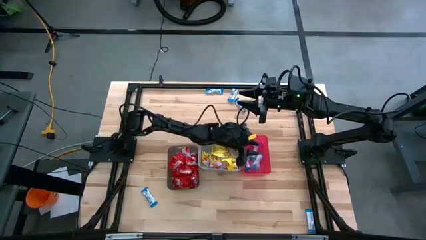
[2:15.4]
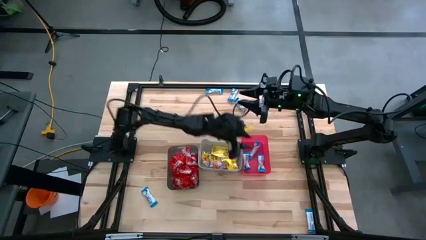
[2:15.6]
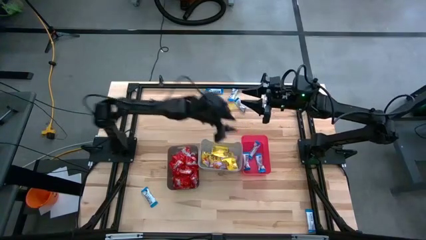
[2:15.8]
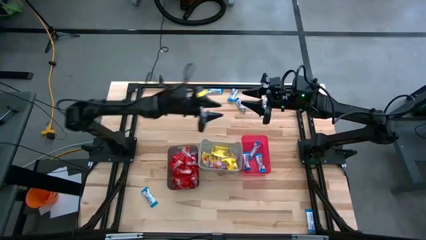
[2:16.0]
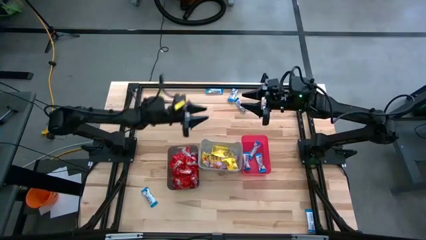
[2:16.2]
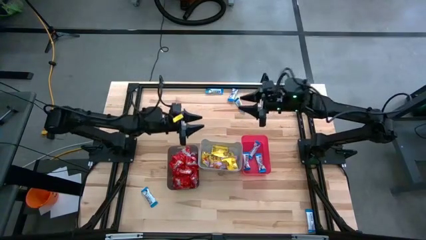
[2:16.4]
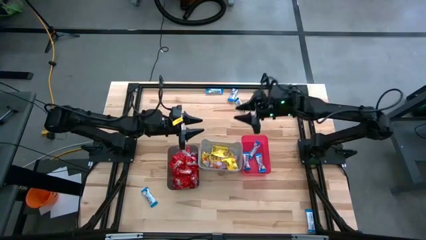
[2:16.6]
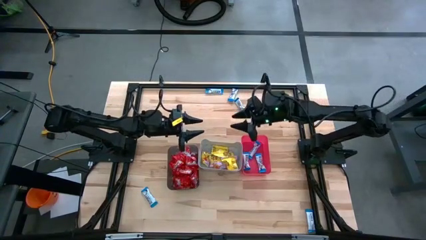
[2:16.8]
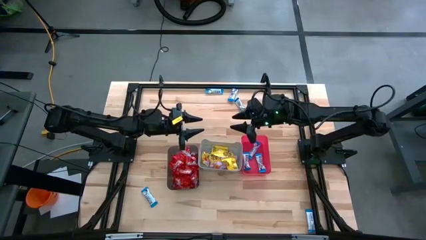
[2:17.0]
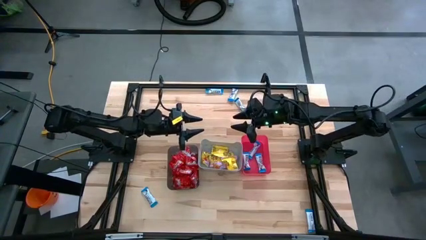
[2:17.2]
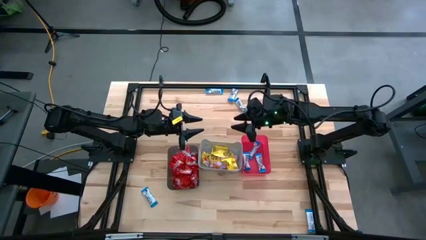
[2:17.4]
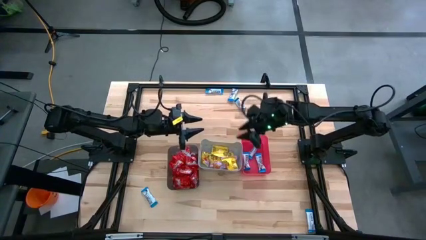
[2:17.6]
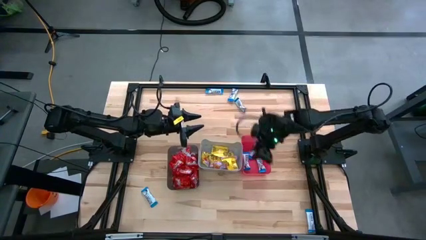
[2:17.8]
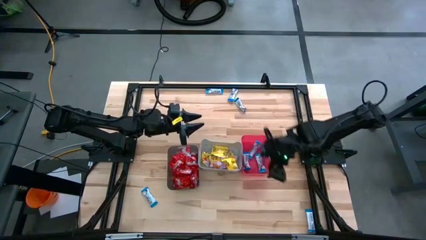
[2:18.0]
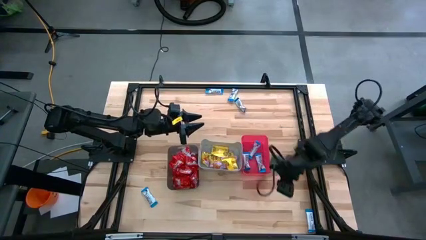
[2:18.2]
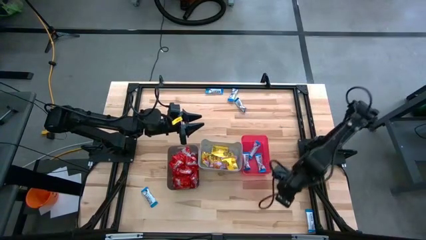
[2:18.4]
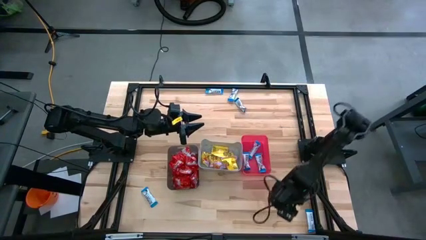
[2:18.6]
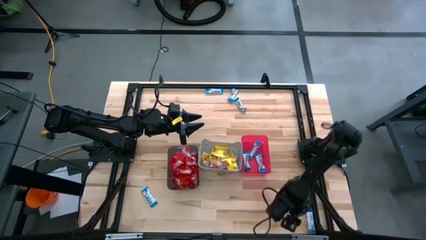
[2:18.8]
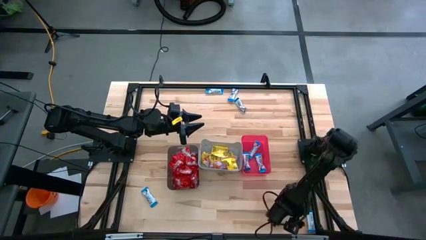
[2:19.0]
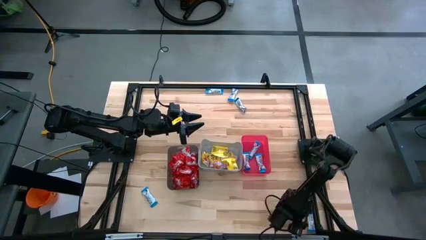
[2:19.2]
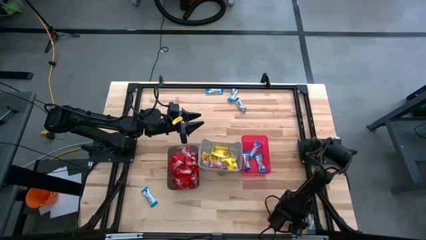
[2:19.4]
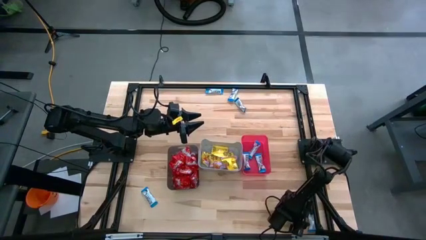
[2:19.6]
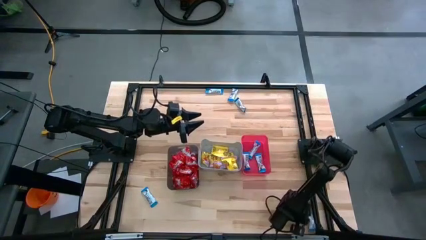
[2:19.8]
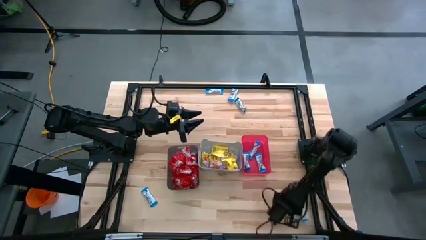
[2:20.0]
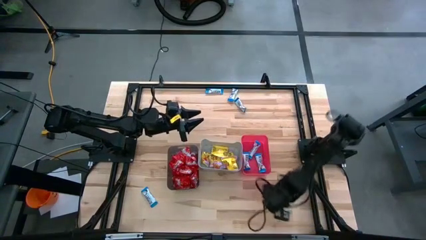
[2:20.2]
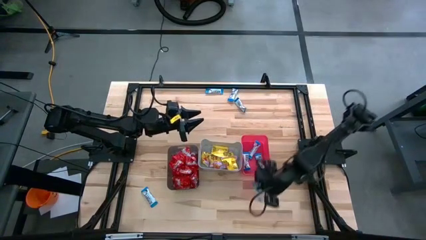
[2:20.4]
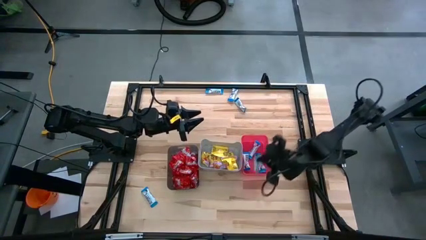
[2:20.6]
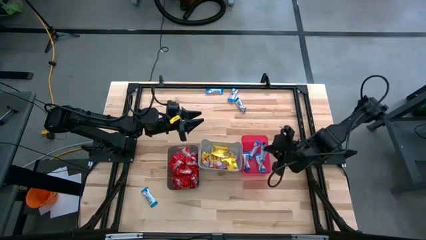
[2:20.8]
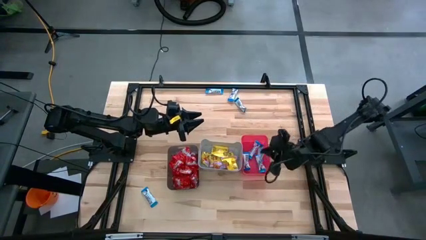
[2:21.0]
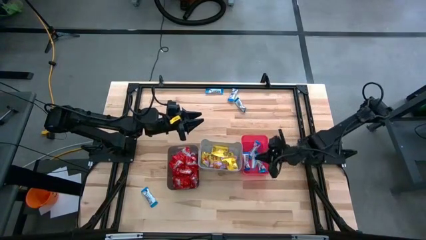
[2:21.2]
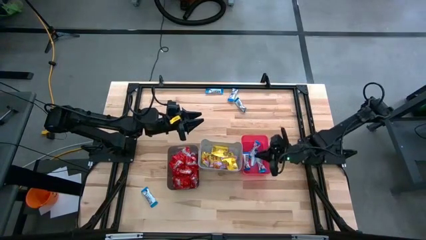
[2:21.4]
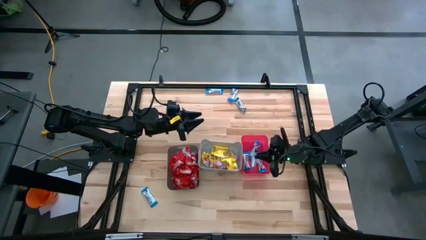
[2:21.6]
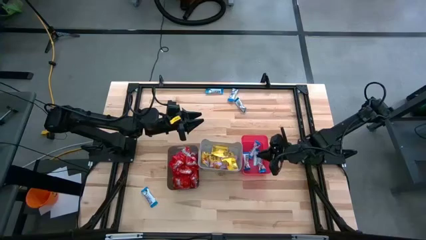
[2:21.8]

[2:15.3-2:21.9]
Task: Sort candy
Put the white chocolate into the pink bin

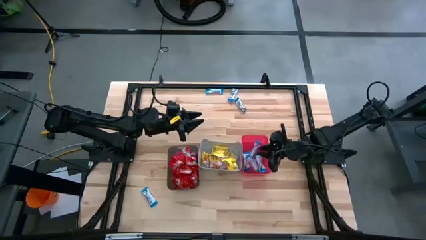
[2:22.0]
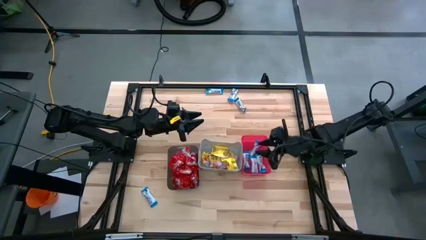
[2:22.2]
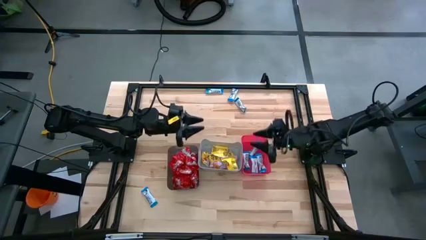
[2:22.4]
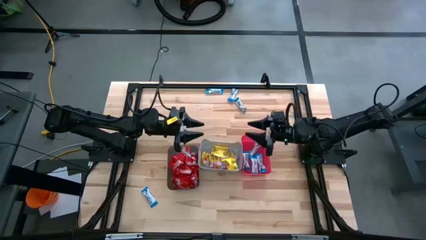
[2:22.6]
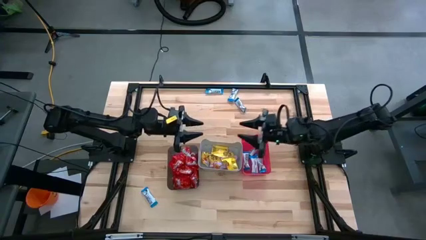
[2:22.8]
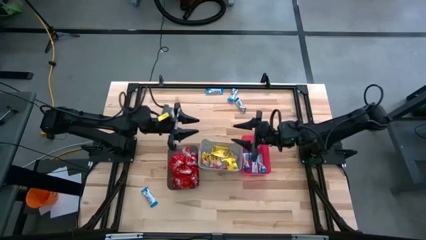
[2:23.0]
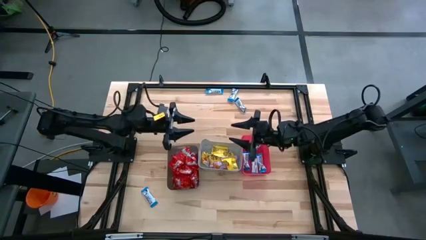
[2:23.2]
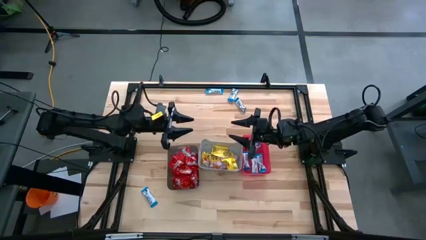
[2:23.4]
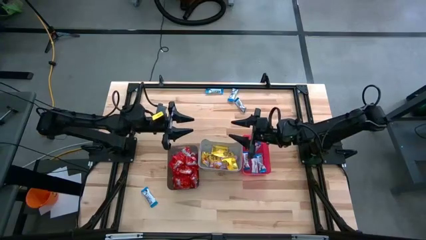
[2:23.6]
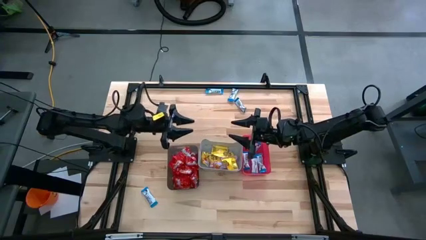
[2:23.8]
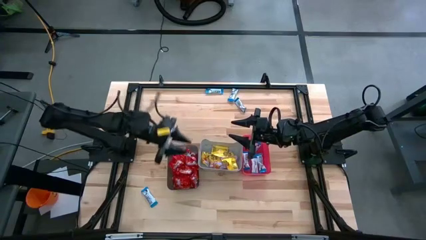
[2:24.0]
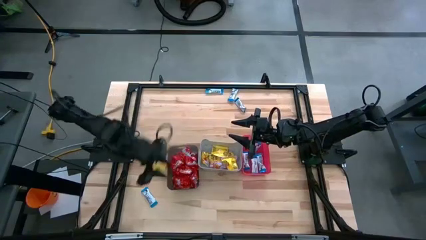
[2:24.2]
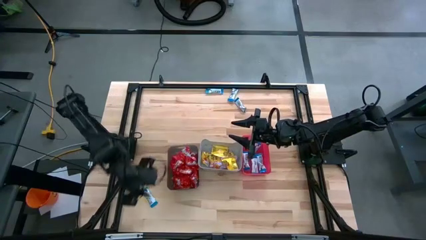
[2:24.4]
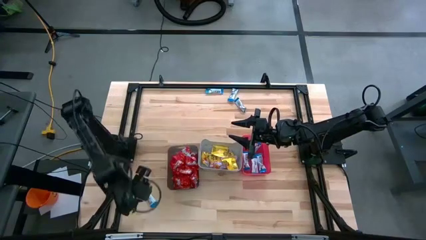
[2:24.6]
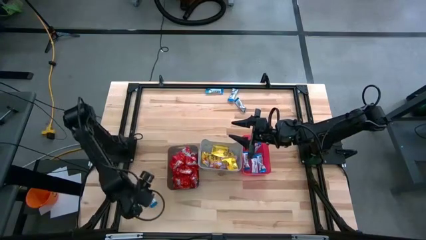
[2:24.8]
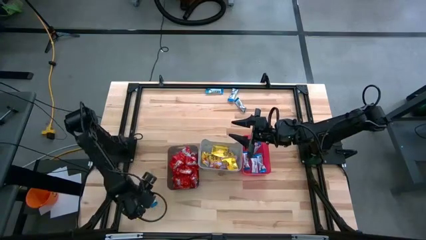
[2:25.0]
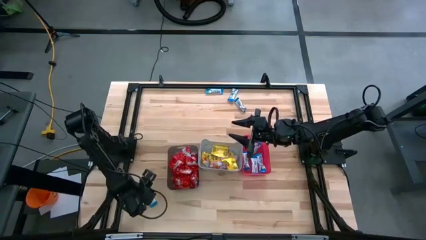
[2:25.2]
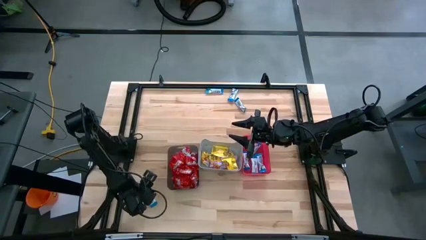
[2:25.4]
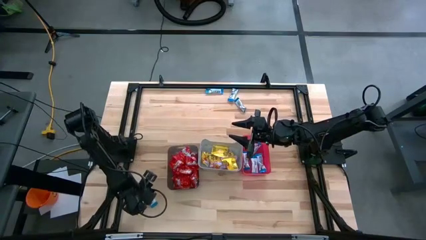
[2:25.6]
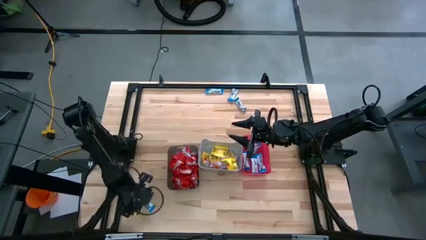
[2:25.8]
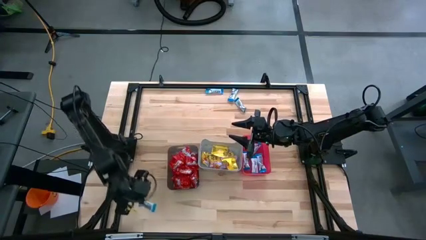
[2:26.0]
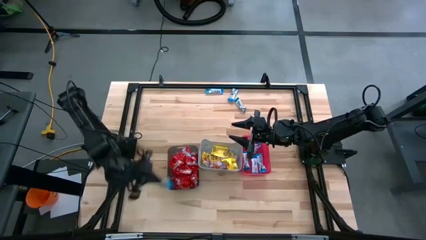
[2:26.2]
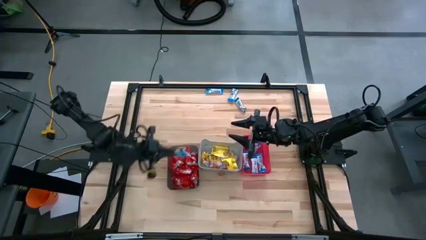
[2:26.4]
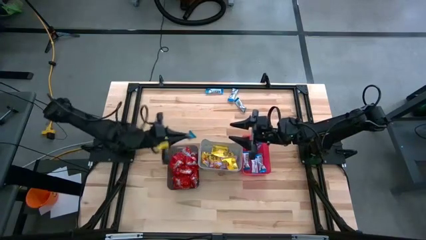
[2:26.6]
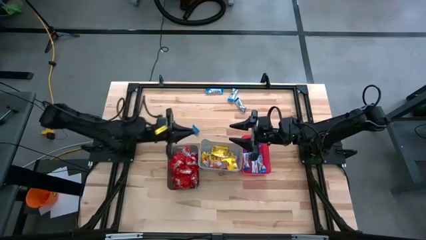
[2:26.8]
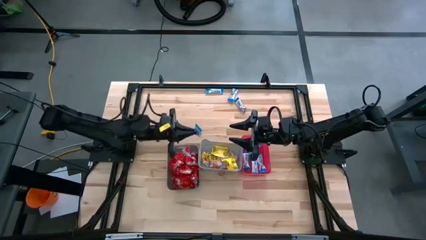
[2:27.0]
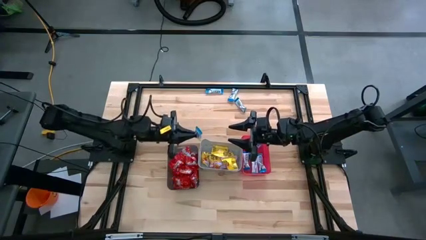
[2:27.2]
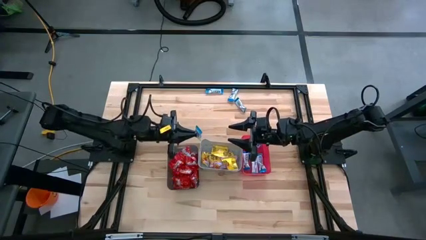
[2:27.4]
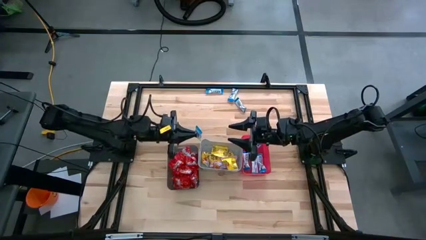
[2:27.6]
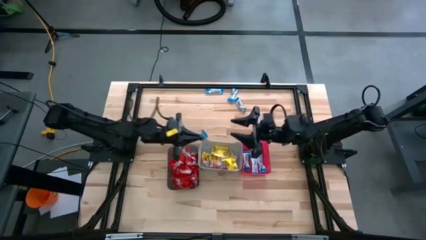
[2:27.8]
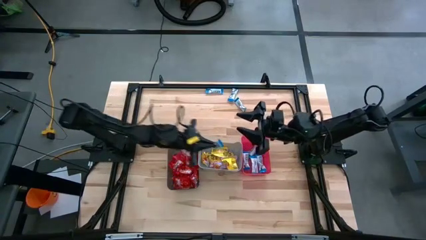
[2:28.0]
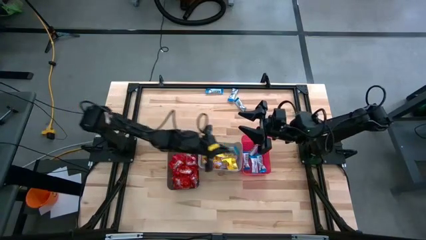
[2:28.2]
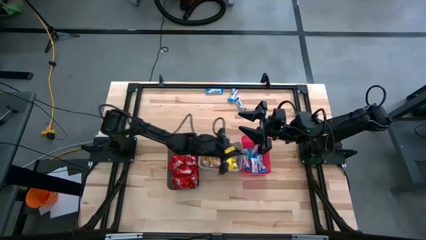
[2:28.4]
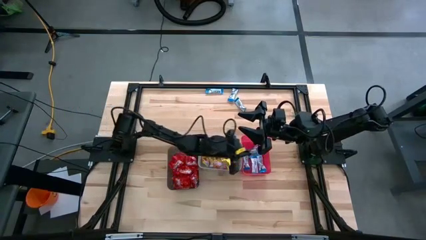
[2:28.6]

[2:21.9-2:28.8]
Put the white chocolate into the pink bin

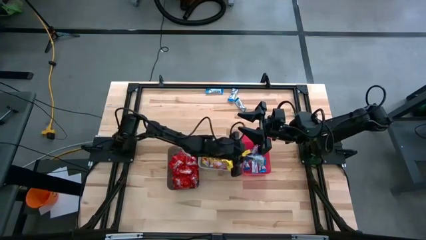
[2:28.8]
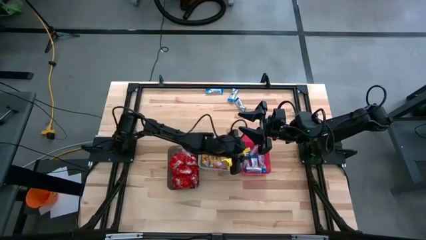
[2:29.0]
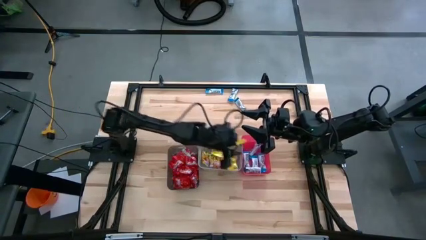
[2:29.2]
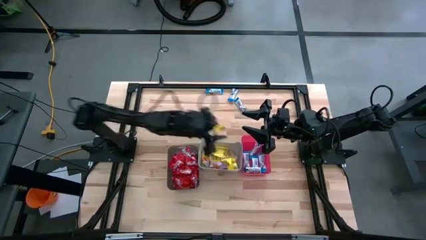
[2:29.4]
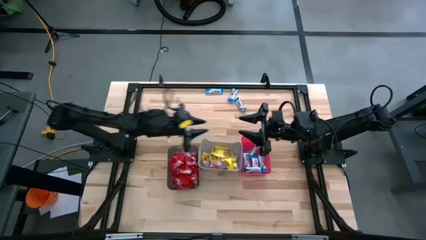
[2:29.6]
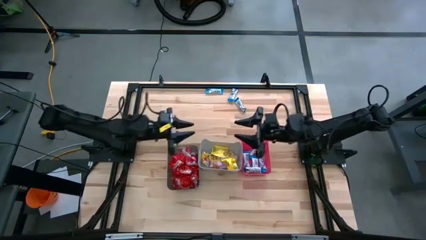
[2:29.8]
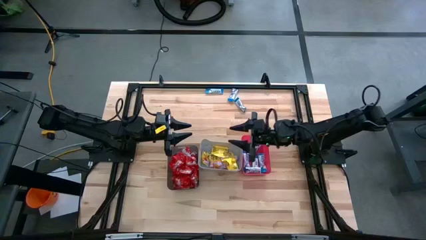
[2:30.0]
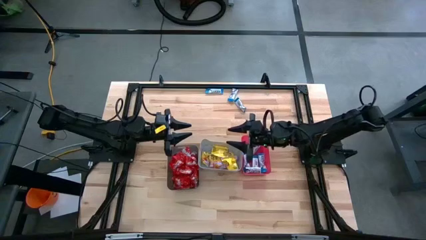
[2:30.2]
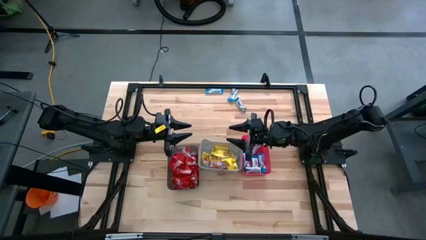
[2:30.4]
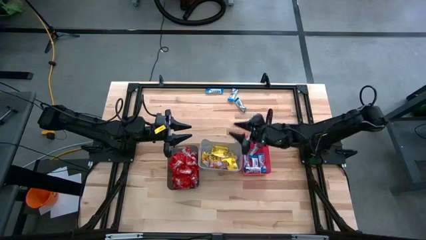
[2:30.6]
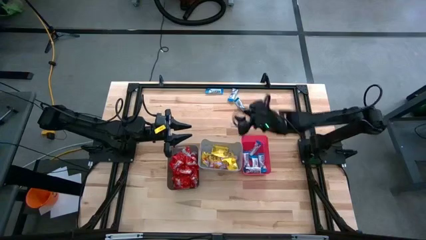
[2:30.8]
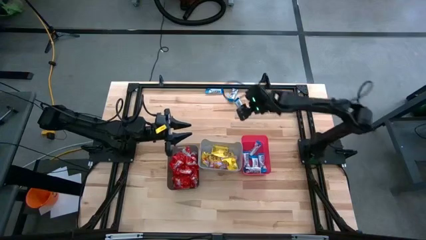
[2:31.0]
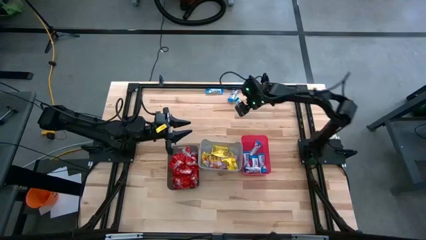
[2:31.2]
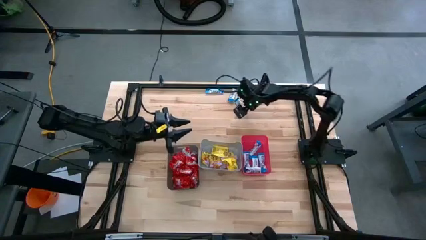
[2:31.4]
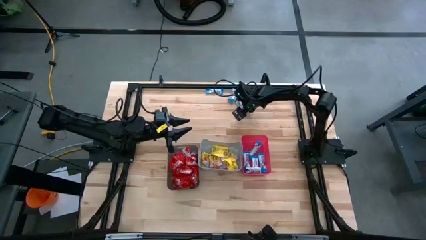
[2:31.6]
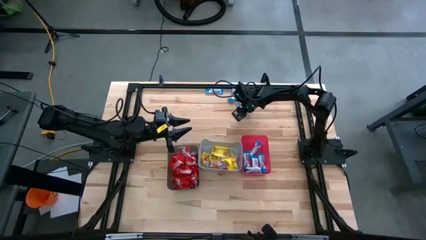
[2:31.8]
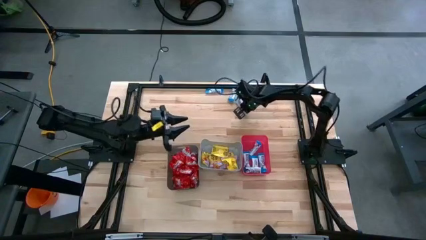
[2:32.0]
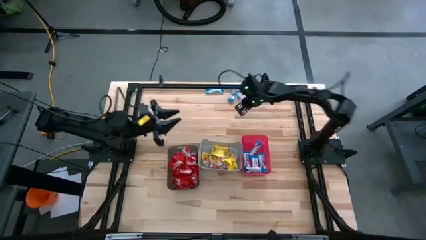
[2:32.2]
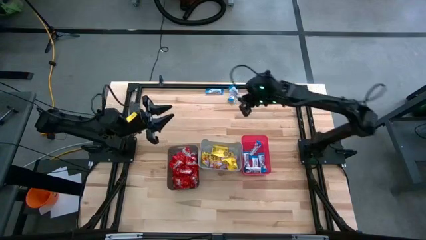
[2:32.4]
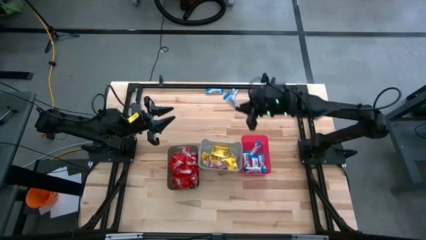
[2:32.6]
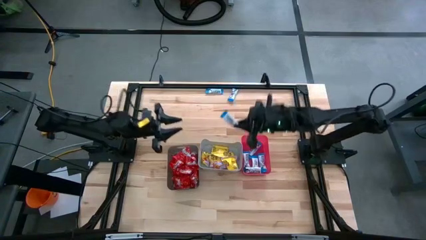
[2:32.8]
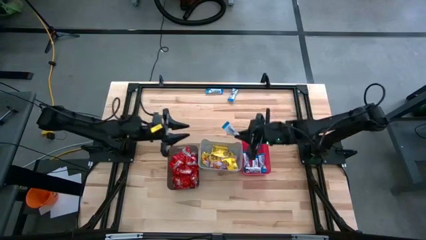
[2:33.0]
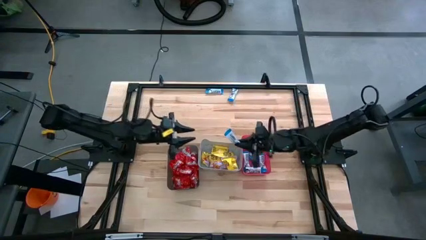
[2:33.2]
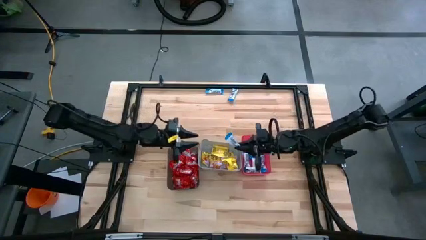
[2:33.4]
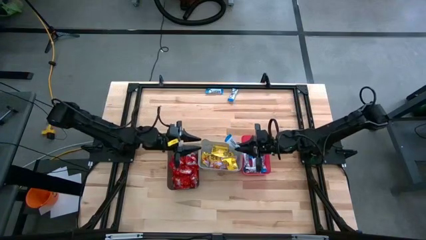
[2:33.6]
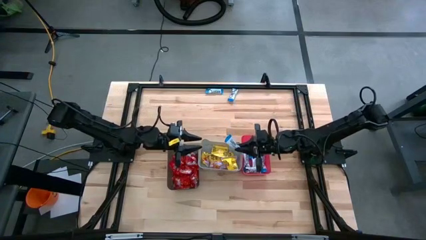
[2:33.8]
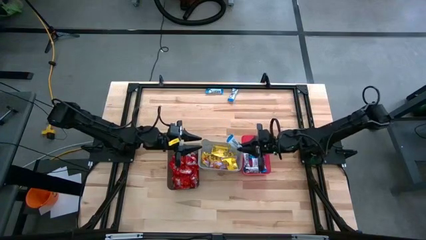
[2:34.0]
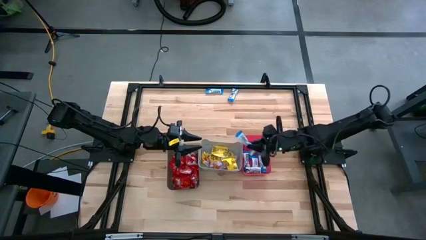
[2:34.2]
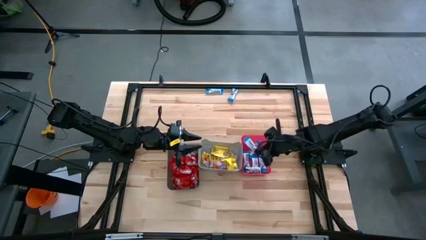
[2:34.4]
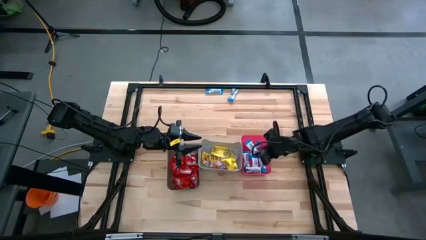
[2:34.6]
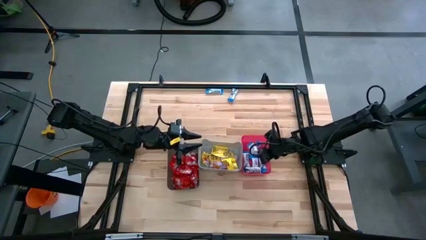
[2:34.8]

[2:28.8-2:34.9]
Put the white chocolate into the pink bin
